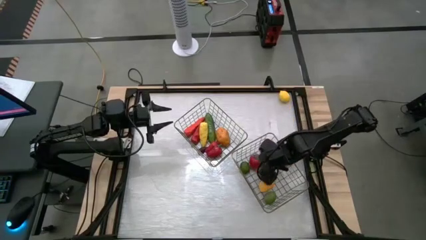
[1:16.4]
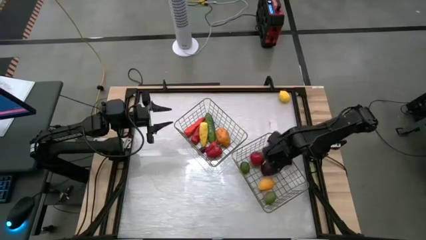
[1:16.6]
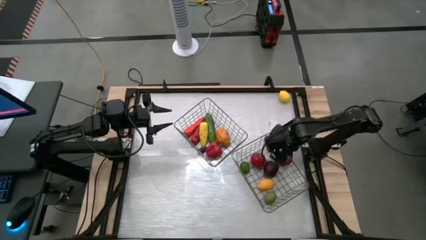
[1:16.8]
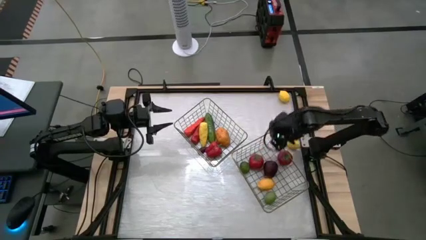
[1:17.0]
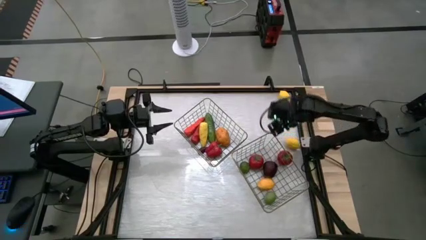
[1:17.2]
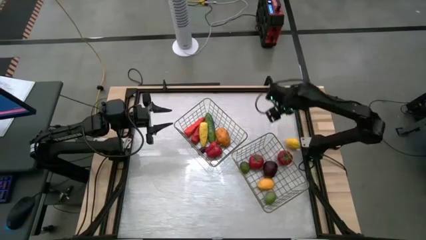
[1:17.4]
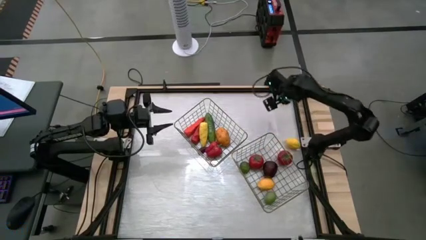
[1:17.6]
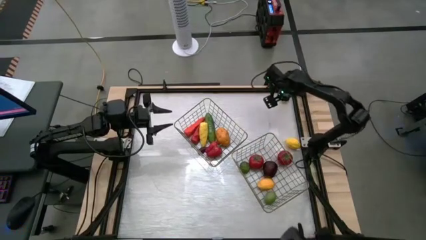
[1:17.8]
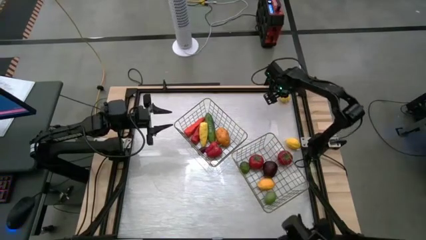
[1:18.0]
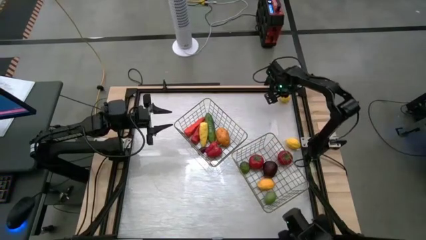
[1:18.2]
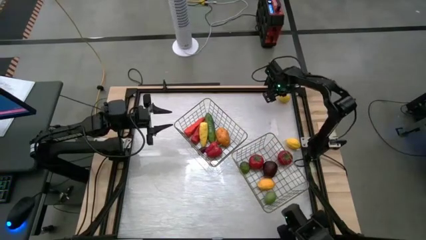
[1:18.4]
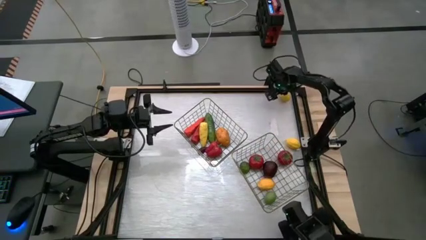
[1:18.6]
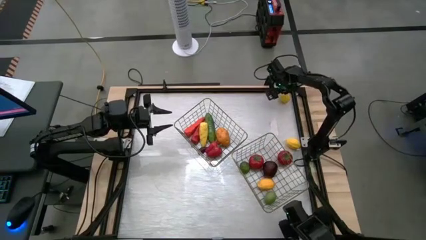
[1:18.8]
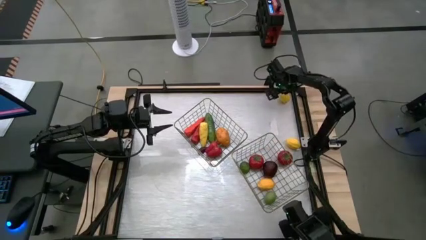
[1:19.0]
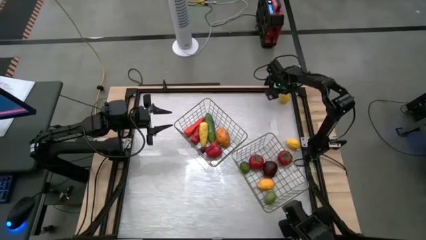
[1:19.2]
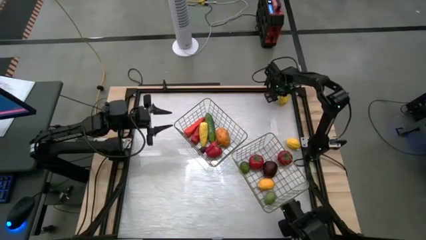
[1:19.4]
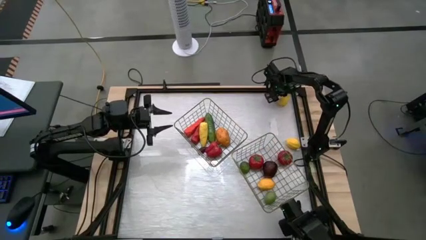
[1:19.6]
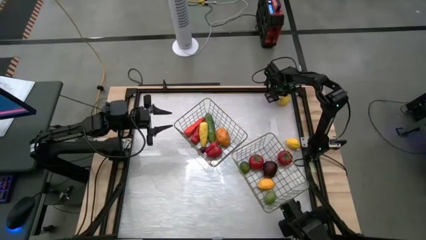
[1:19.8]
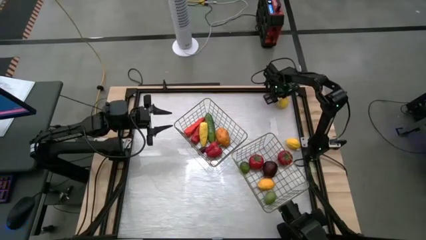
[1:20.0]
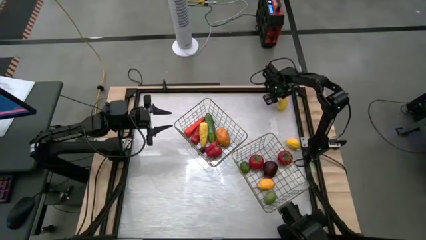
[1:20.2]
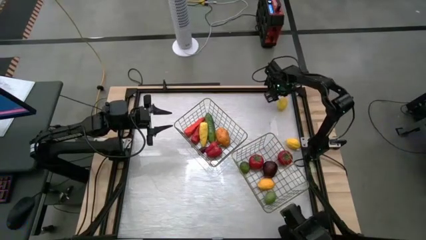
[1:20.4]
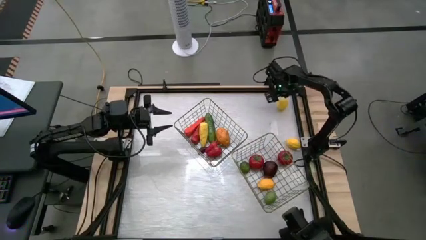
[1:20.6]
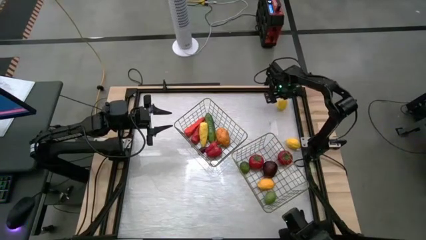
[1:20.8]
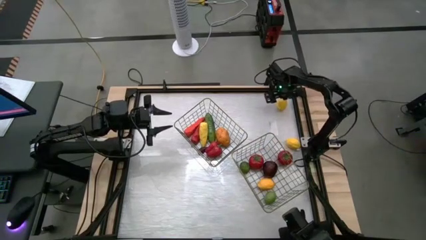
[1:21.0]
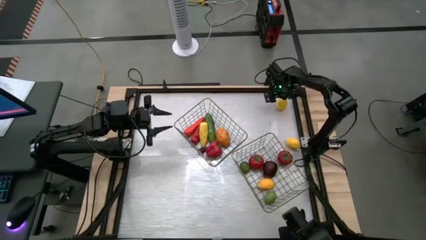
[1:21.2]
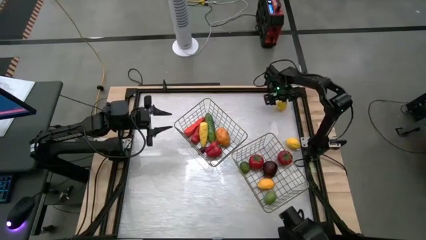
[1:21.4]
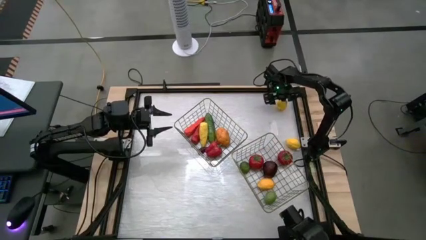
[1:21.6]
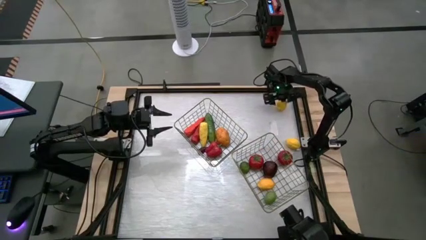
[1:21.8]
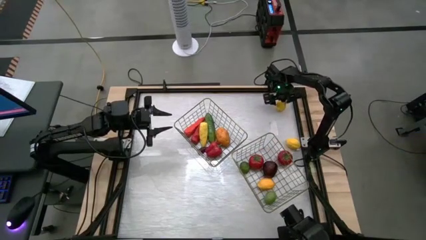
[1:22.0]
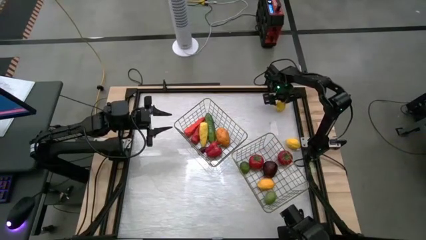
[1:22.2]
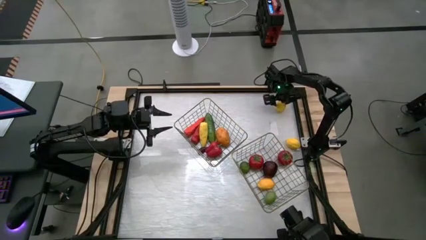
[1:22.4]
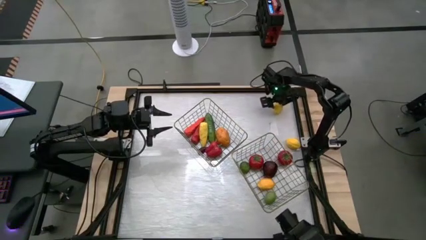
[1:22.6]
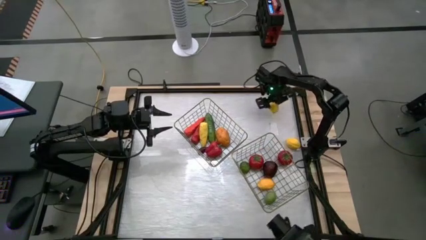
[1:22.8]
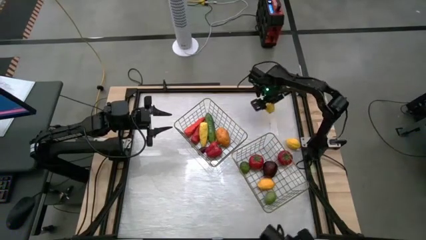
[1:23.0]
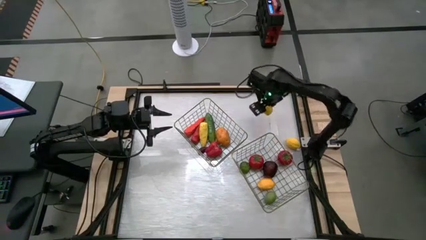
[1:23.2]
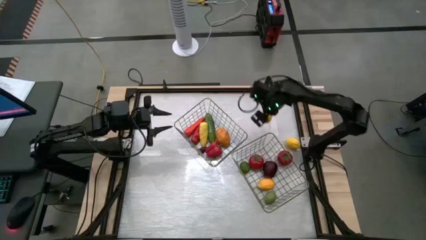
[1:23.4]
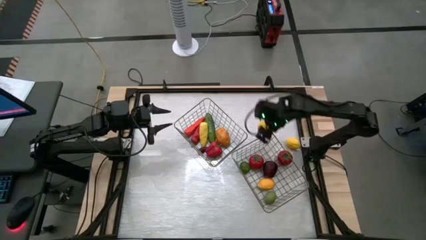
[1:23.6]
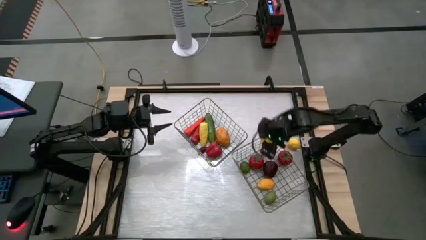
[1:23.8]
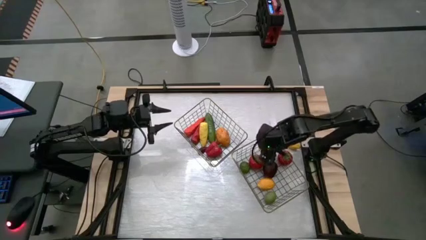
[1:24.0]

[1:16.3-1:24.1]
Task: Sort produce into baskets
Put the top lemon into the right wire basket

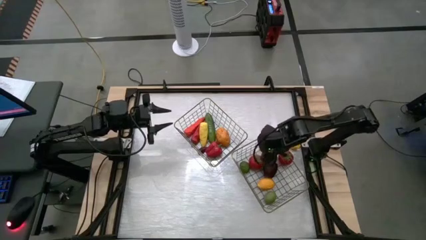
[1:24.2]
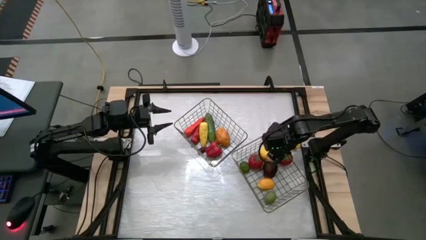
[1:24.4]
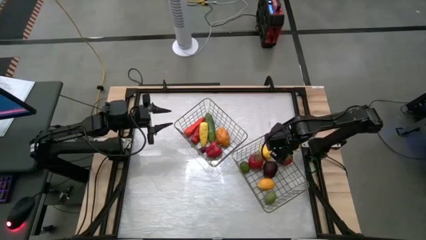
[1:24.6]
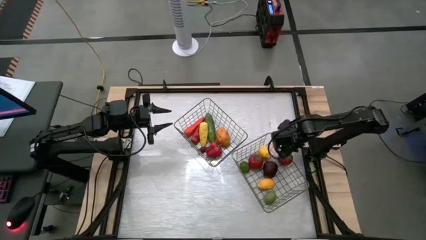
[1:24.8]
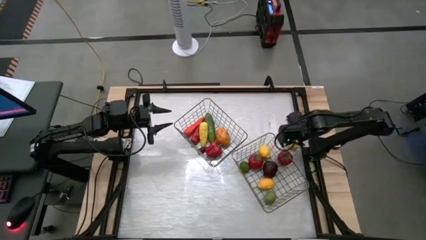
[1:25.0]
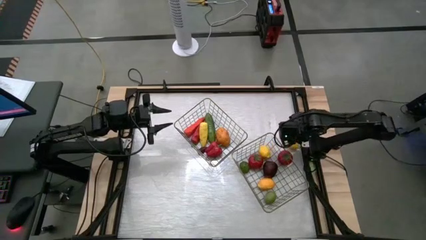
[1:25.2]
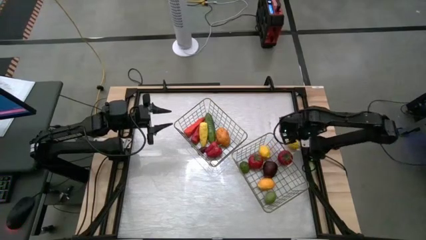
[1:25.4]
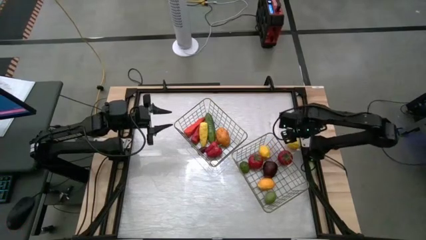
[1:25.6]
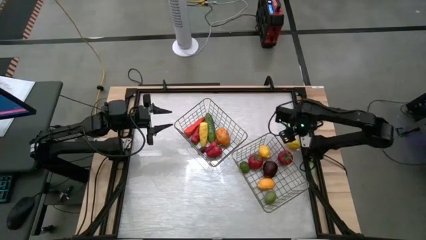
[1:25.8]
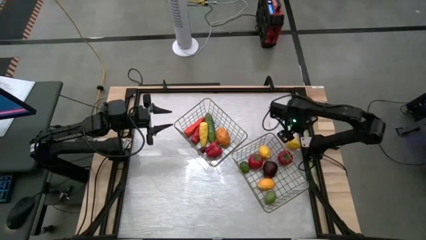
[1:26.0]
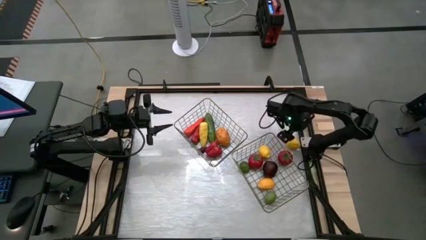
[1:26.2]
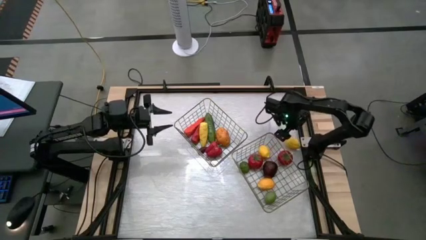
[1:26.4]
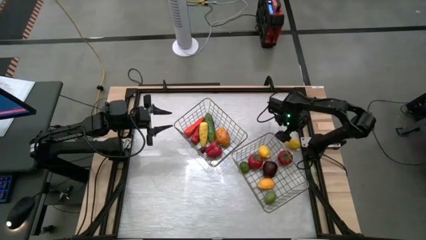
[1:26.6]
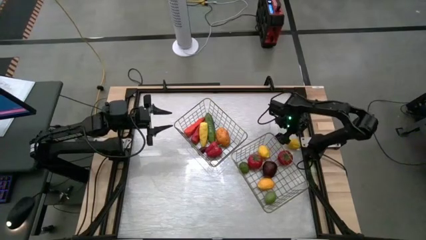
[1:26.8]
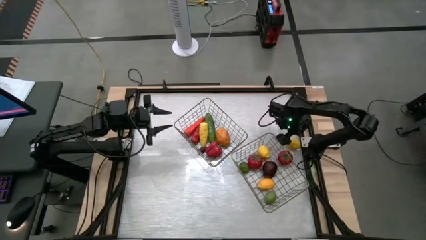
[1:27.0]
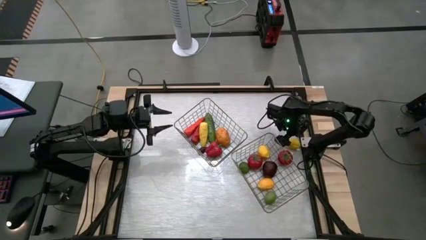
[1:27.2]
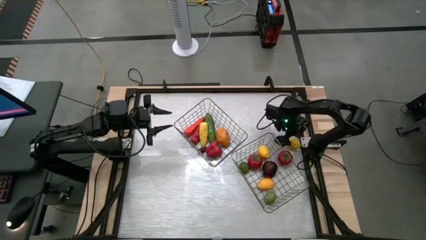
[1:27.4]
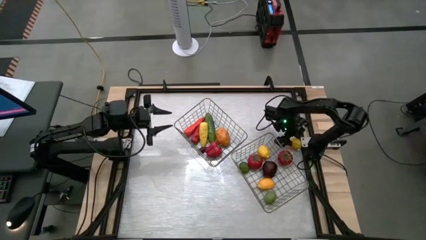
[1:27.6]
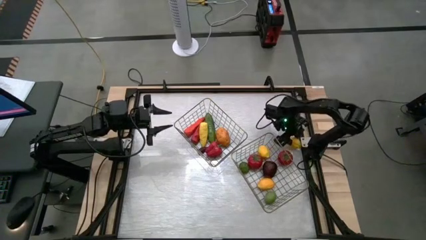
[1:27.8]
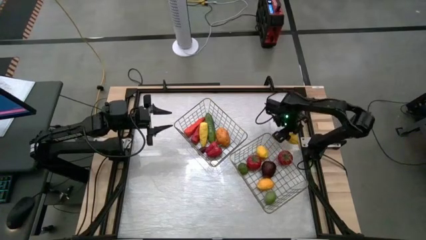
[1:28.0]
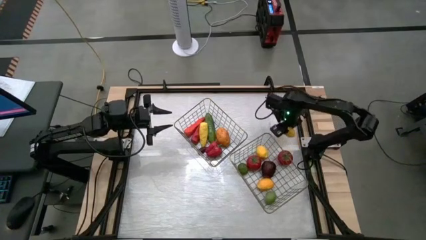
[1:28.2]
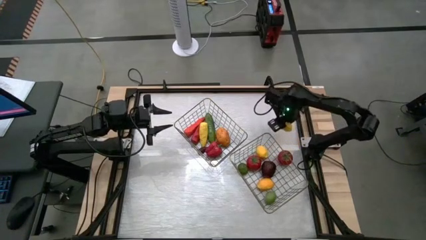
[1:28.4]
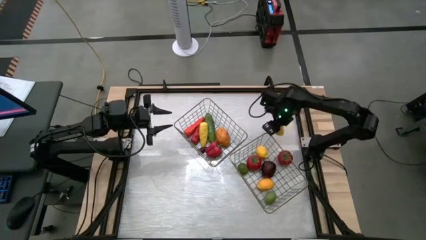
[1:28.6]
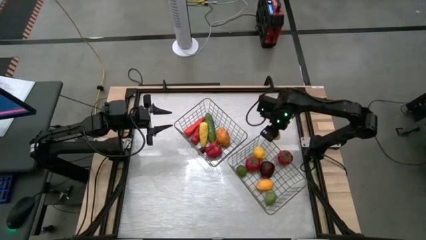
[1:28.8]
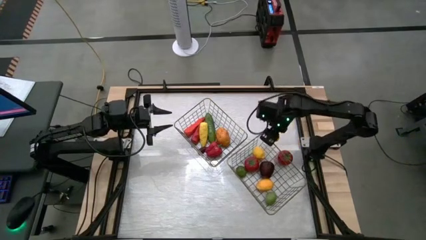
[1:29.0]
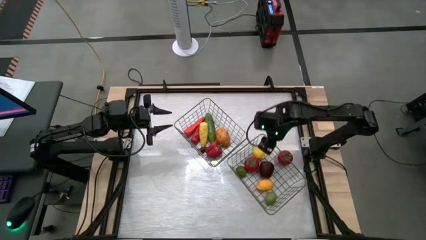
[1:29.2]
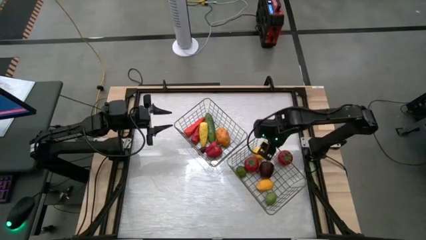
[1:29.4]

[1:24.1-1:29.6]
Put the lemon into the right wire basket

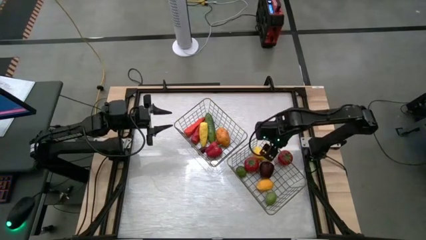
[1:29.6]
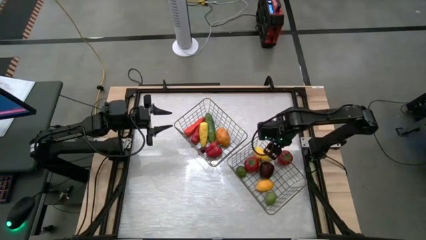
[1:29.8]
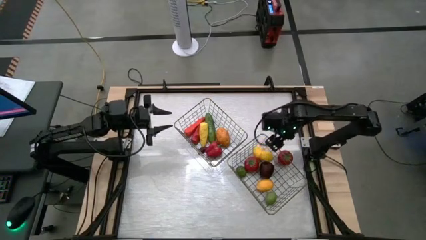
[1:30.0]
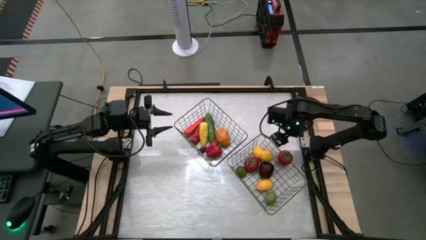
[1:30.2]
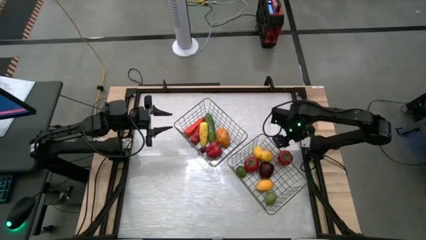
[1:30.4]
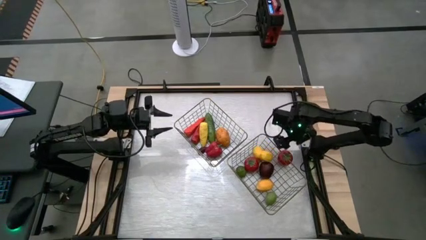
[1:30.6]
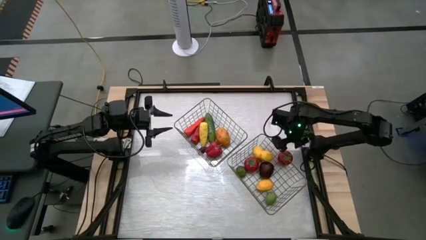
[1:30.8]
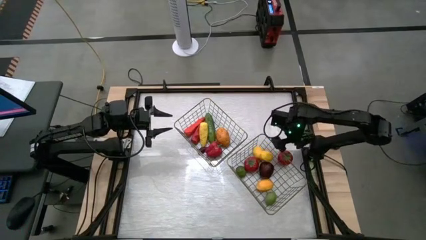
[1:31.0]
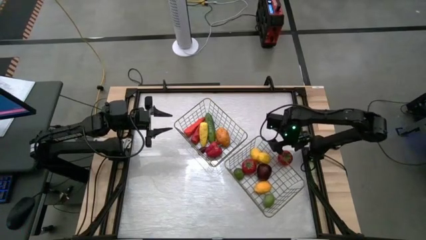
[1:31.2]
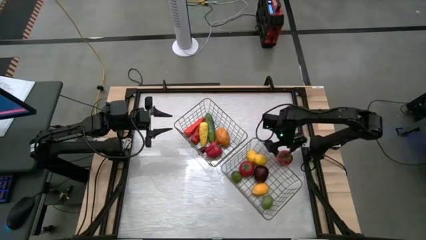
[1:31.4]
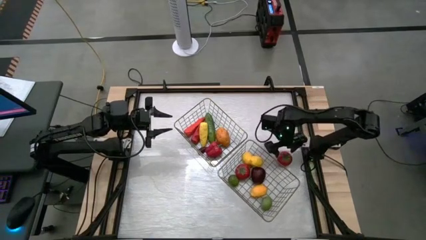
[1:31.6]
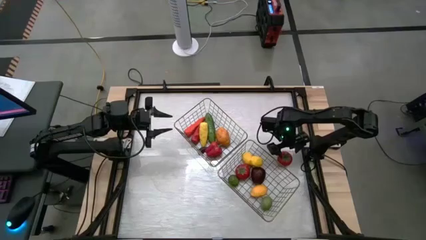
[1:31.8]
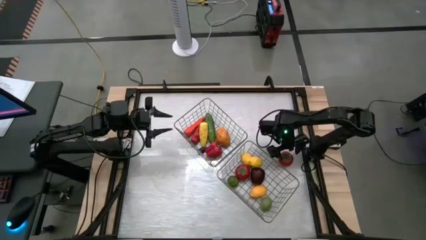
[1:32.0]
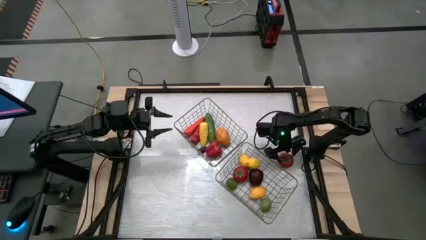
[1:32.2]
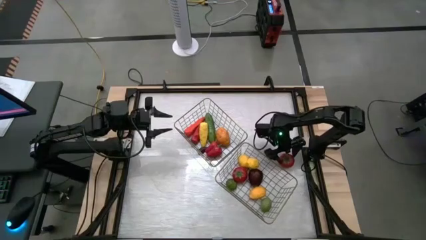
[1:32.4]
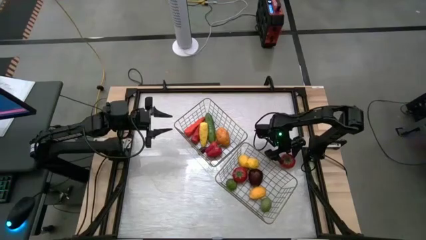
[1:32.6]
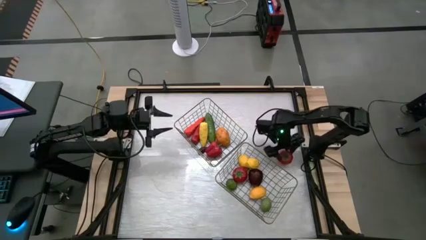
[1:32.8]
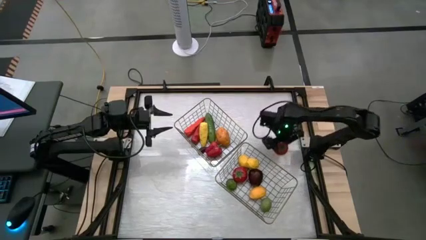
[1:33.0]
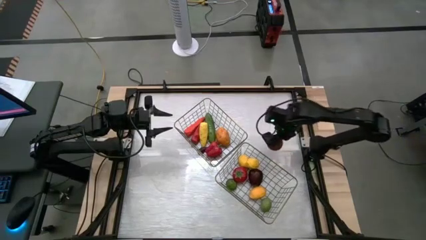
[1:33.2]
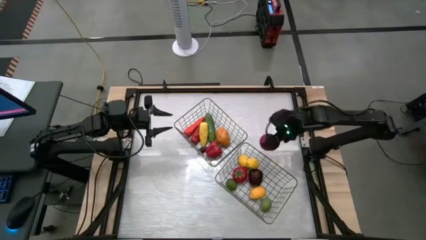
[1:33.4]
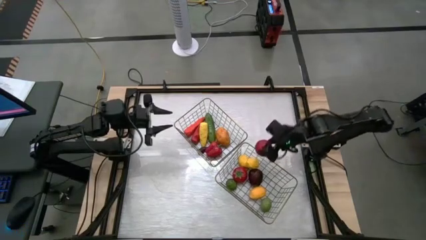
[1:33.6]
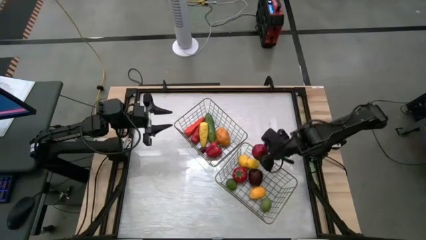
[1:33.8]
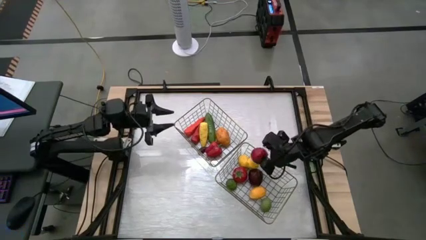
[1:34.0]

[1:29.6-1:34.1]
Put the tomato into the right wire basket
